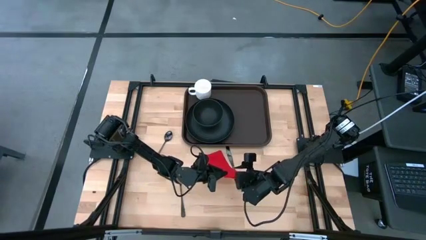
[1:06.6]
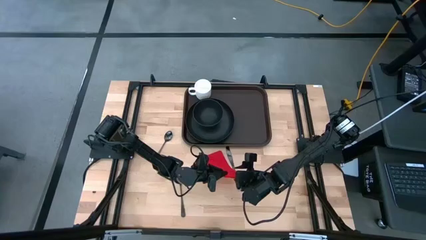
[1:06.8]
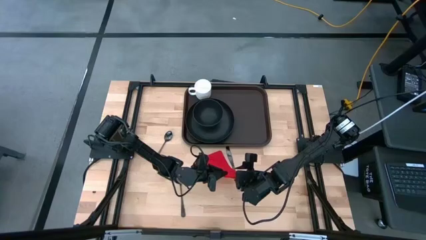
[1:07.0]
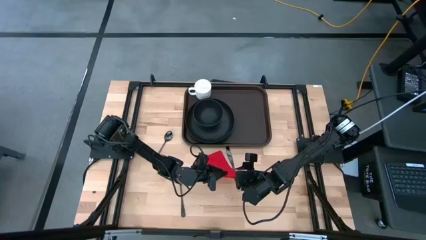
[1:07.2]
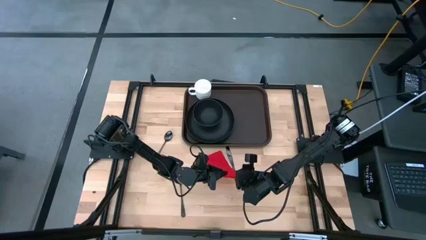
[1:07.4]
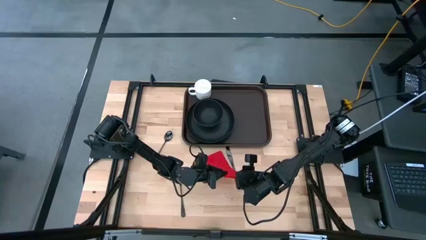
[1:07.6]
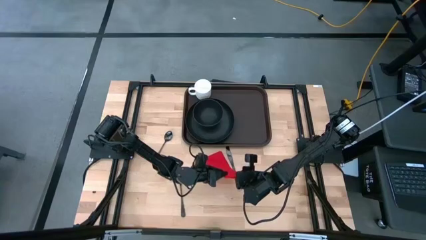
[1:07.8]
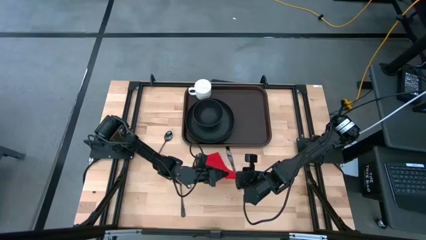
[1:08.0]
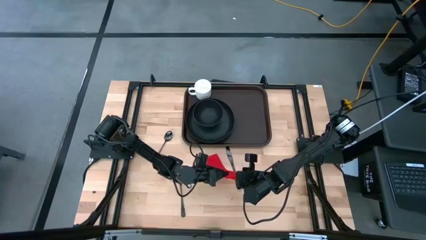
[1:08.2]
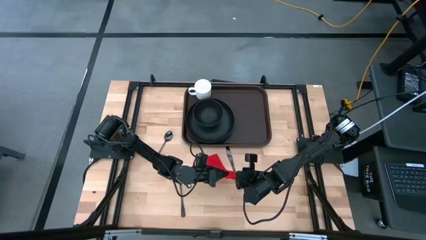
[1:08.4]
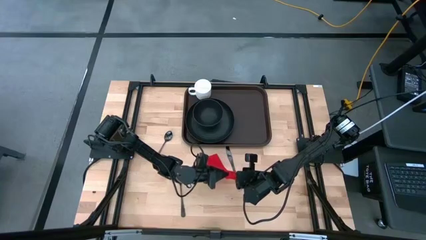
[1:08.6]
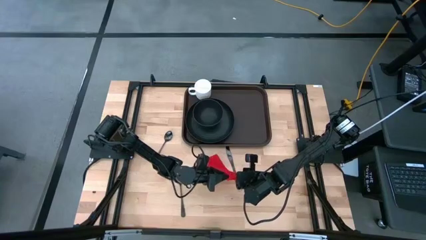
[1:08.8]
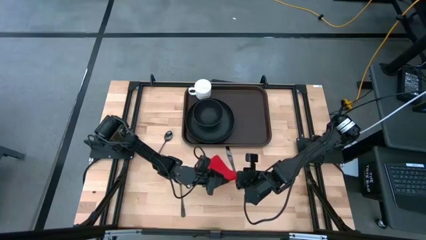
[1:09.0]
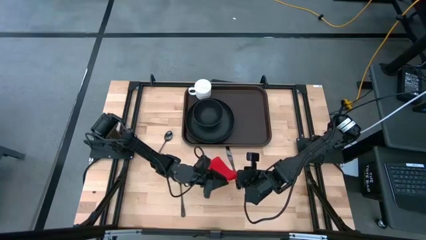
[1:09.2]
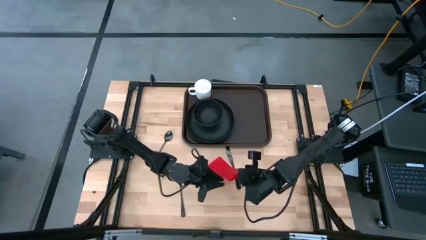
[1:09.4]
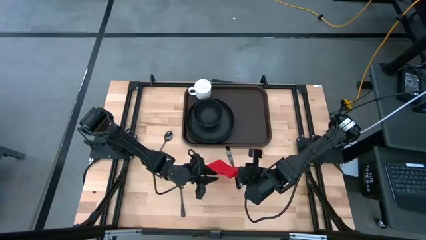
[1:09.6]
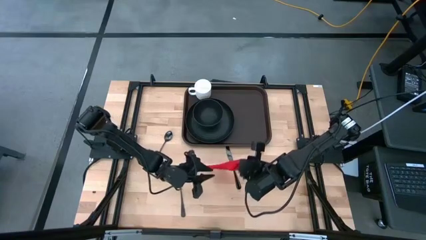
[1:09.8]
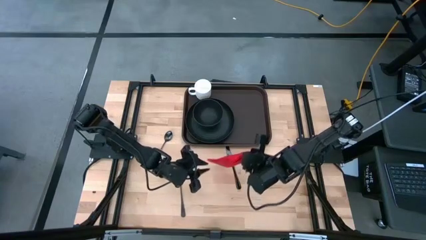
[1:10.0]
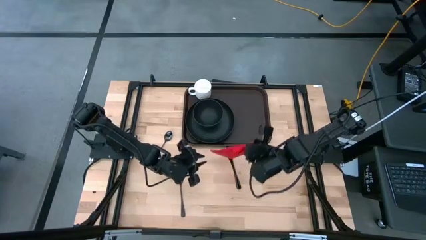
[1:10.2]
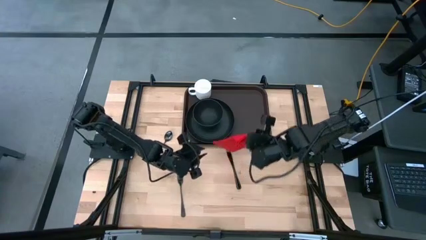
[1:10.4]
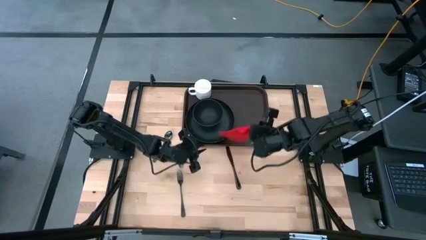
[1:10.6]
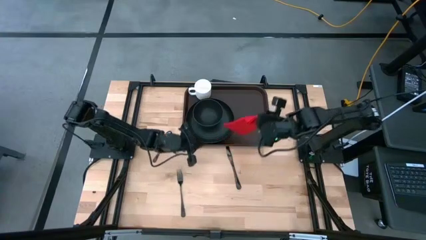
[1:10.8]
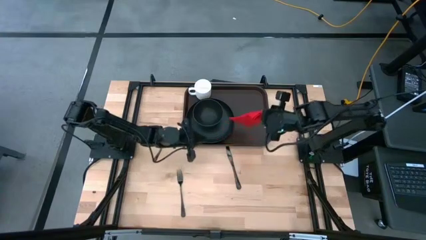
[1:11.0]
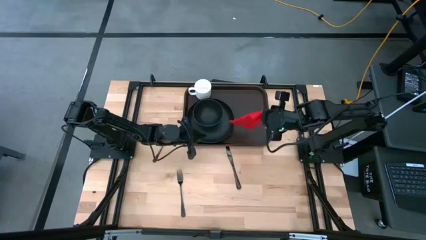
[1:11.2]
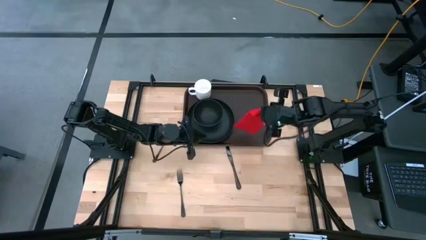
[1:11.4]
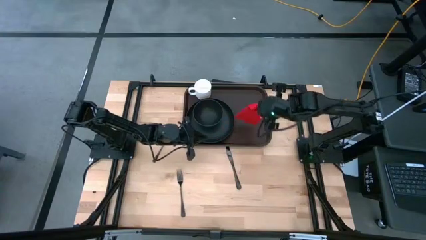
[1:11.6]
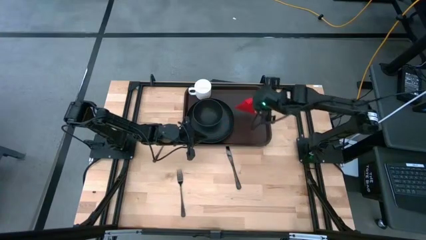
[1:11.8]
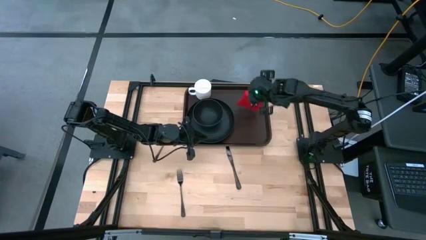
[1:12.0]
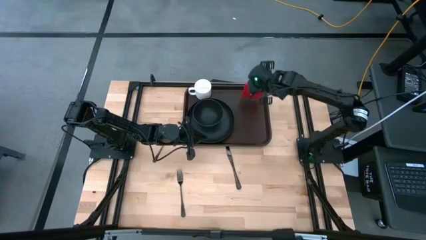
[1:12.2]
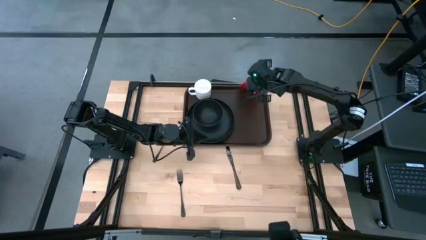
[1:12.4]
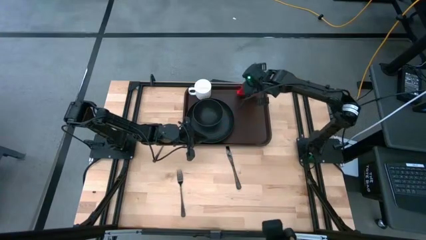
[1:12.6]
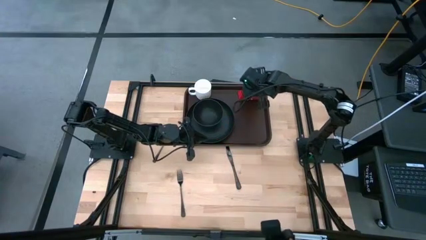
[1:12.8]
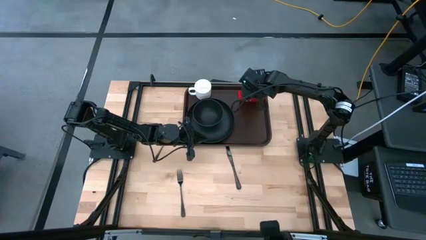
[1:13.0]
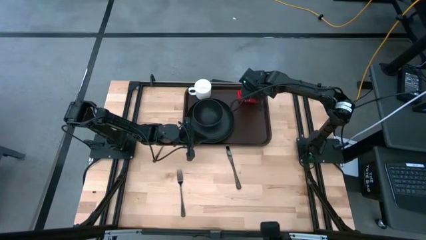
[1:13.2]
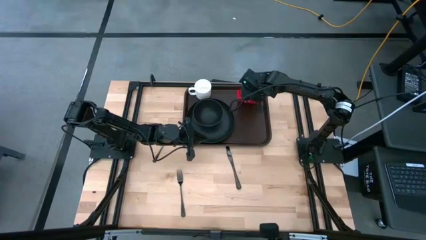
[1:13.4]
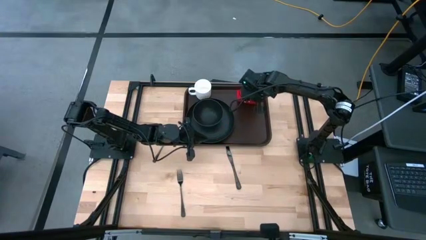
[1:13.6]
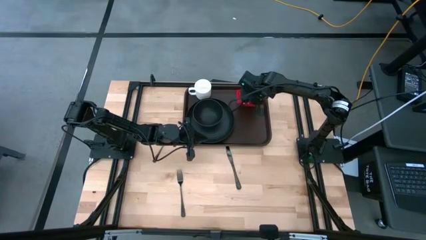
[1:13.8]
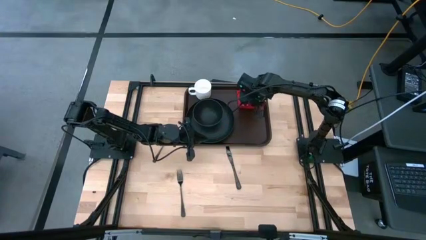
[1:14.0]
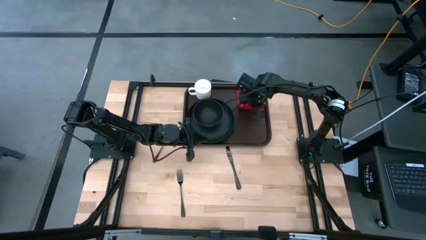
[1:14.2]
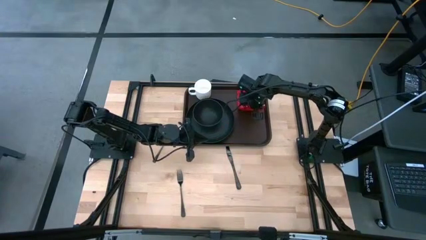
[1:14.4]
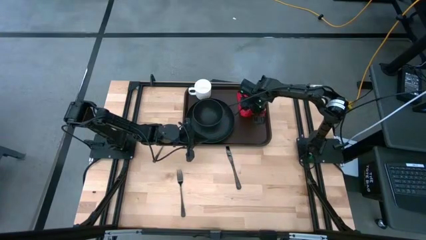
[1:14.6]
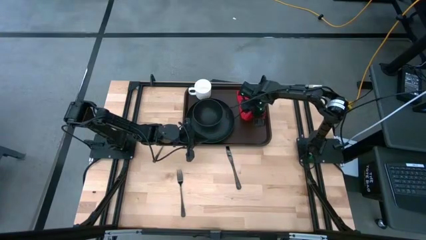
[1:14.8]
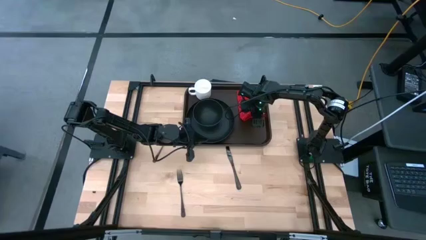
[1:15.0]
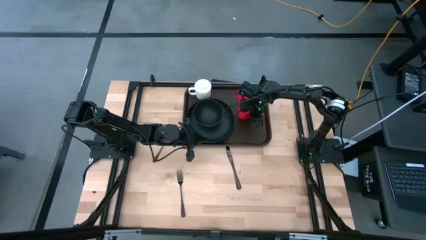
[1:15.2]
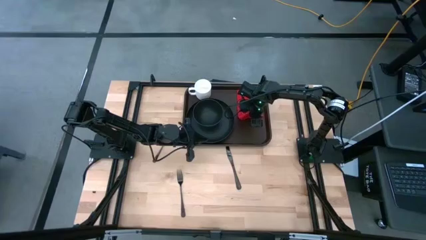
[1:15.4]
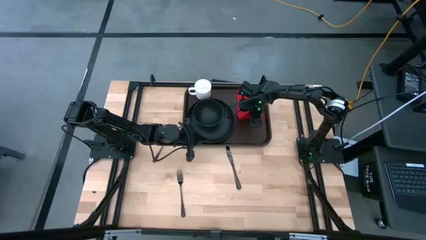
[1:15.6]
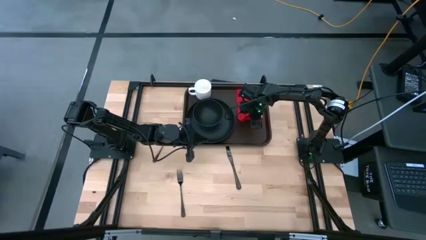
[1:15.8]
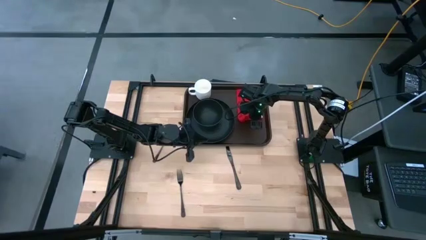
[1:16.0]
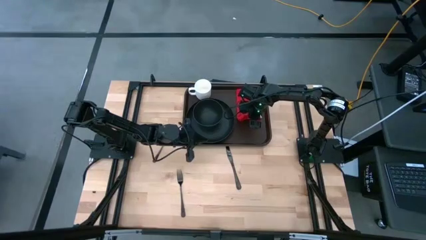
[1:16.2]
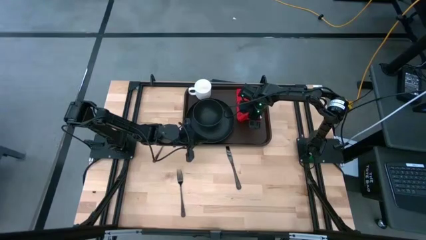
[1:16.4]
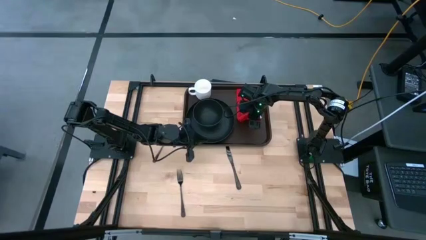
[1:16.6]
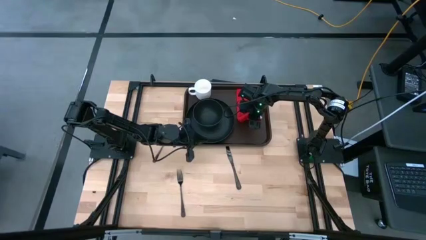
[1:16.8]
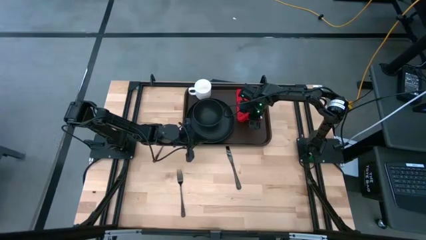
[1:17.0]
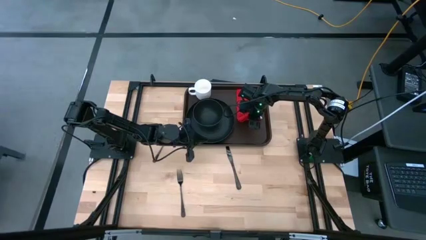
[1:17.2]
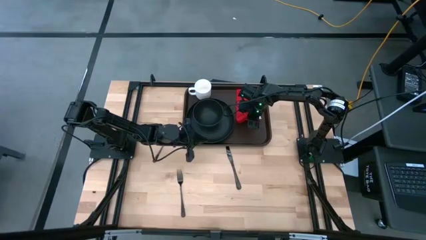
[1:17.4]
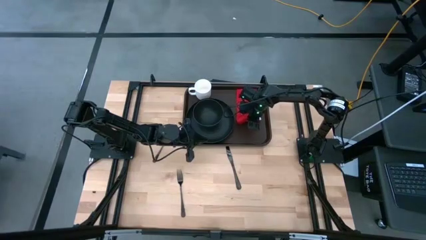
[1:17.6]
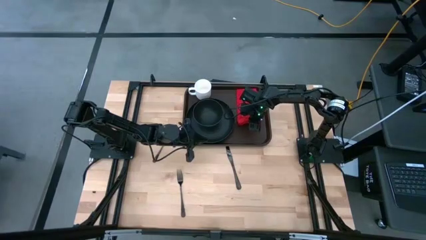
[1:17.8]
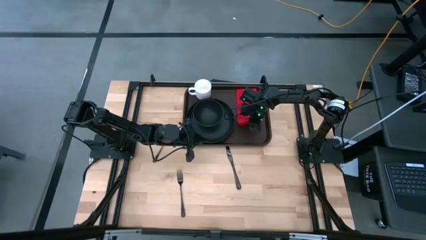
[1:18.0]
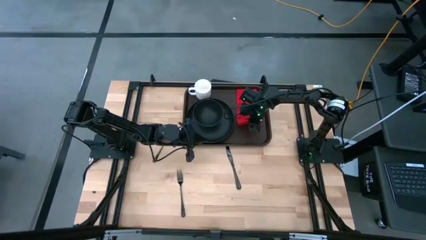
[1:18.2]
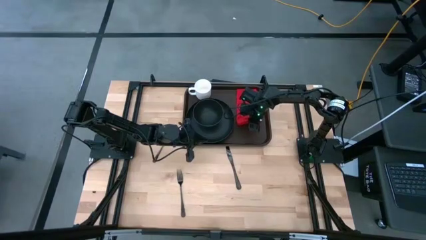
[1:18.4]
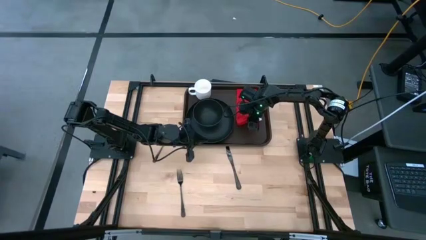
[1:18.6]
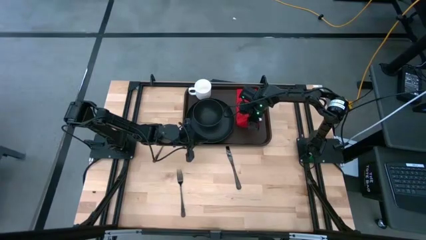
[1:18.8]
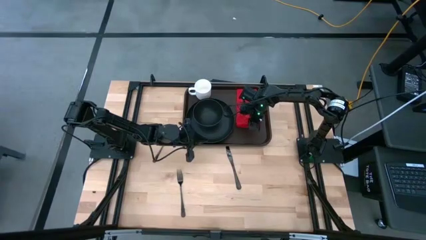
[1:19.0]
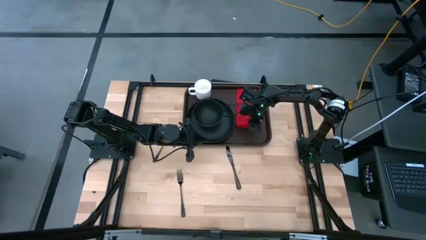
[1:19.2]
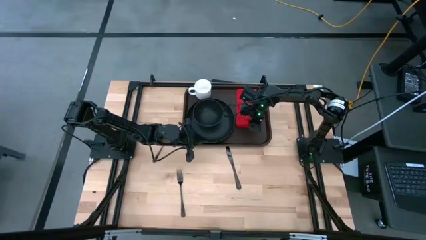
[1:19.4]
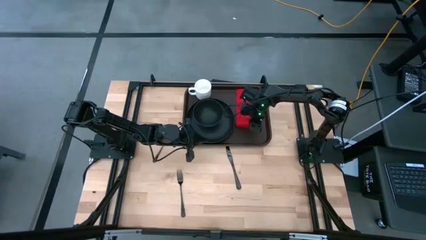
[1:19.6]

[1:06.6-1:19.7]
Task: Set up tray
Put the red table napkin on the brown serving tray to the top right of the black plate
